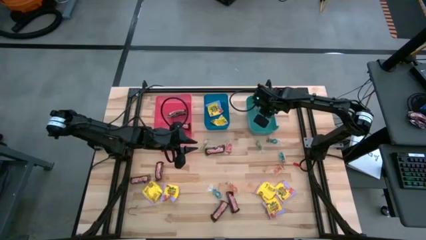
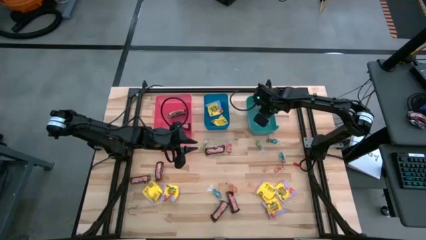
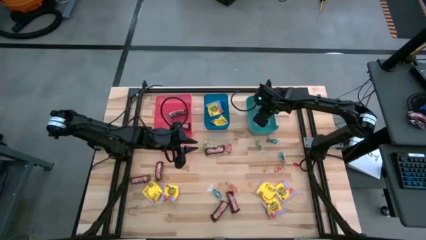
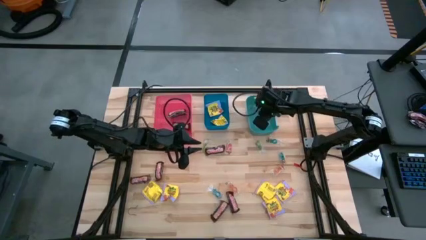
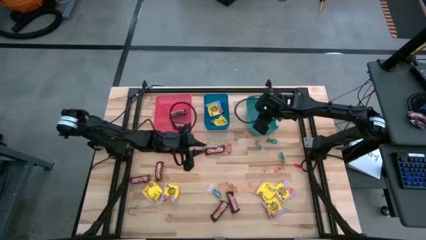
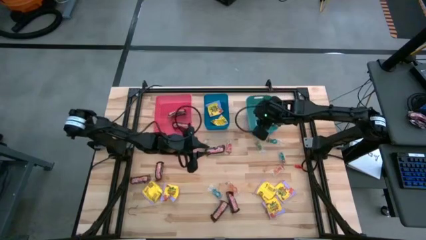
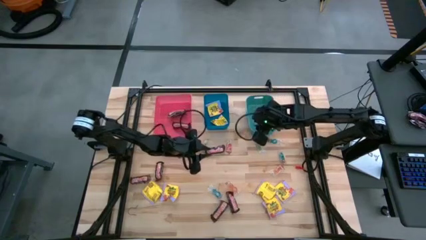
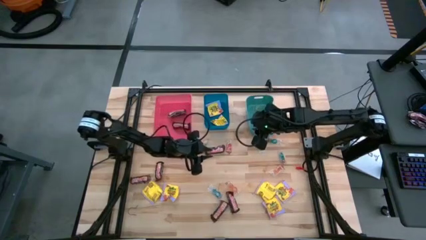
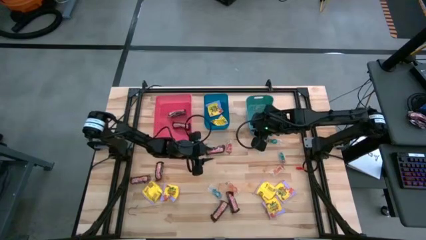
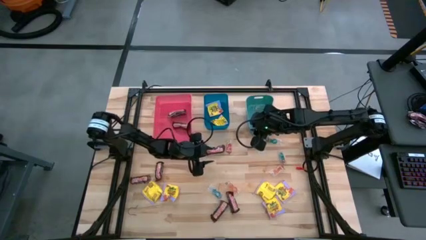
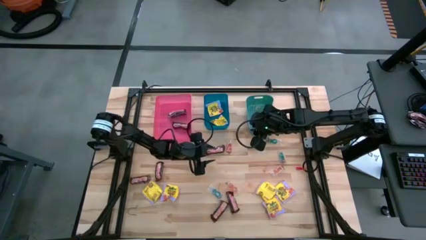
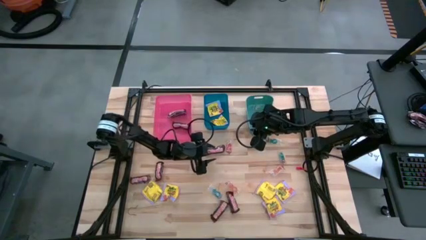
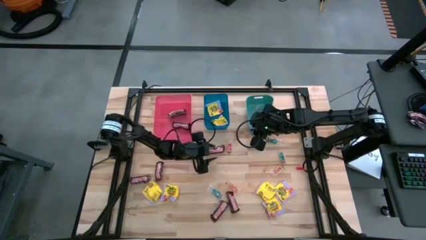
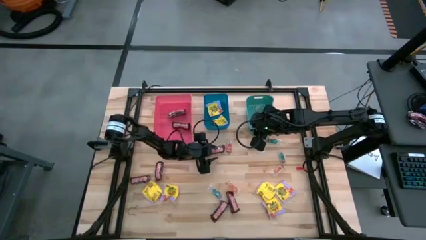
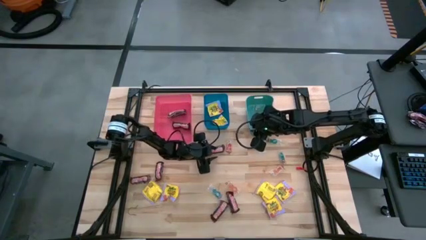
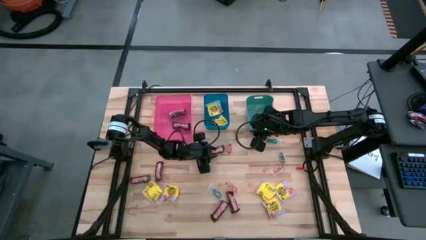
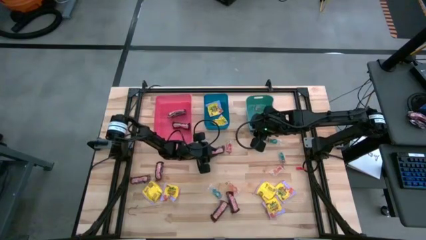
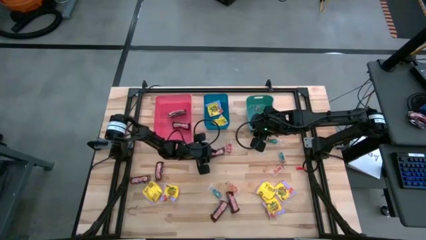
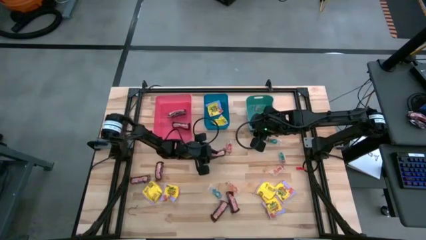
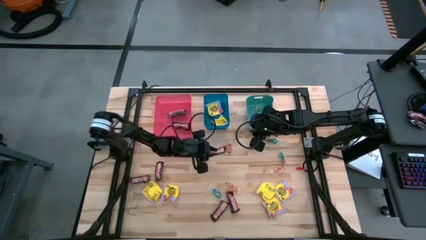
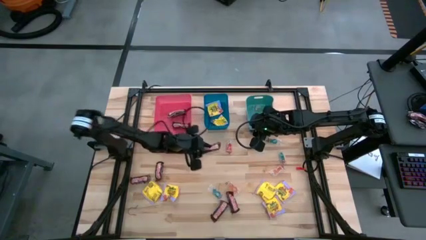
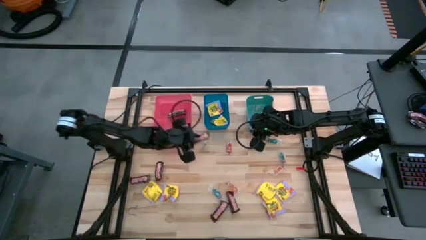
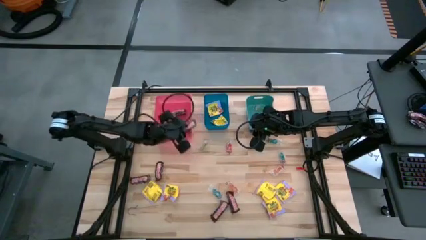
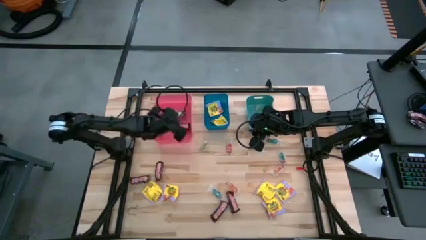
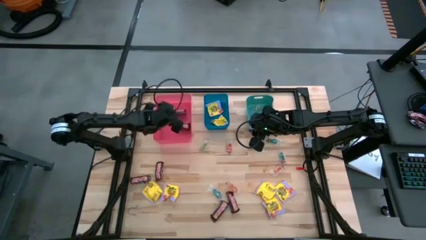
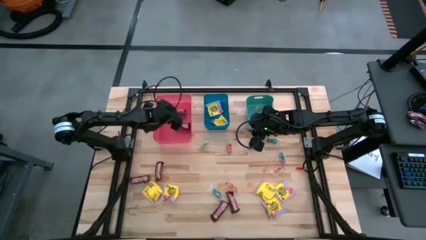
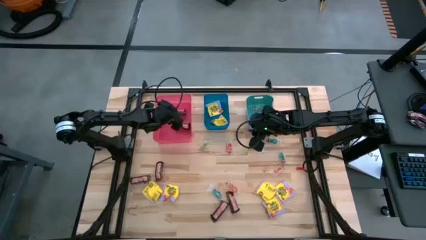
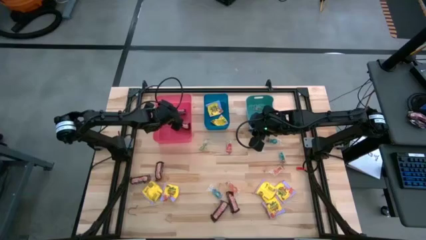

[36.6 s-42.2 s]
Task: Sort candy
Put the chocolate bar into the red bin

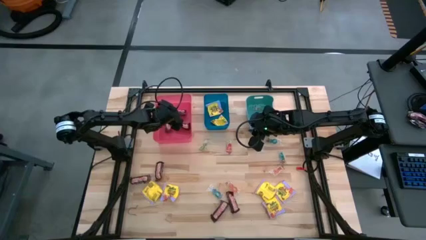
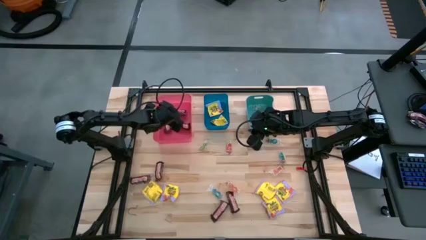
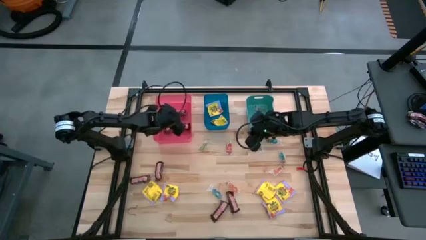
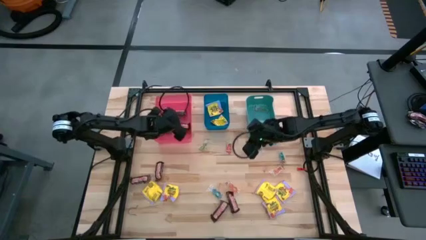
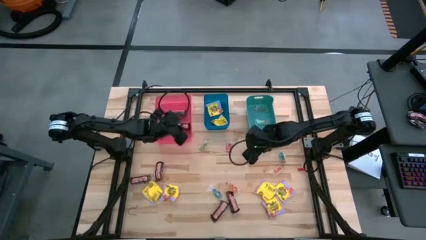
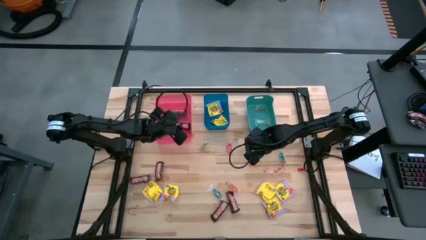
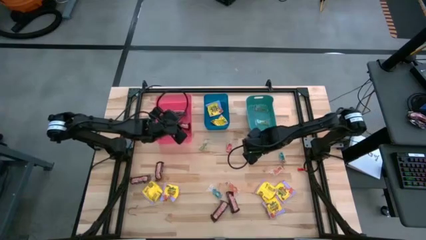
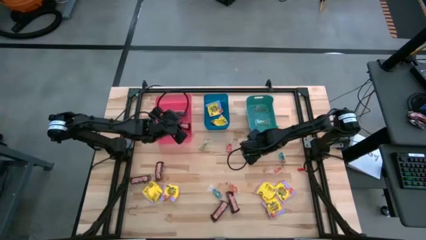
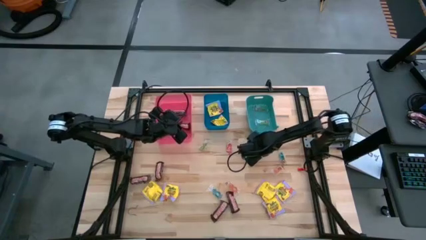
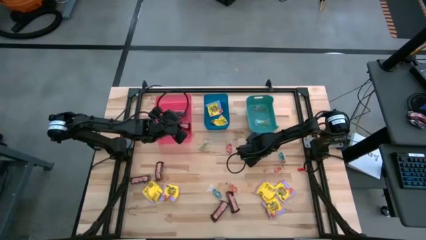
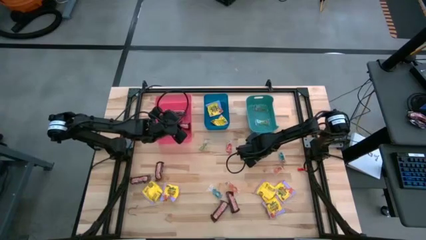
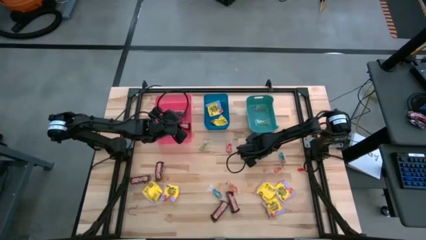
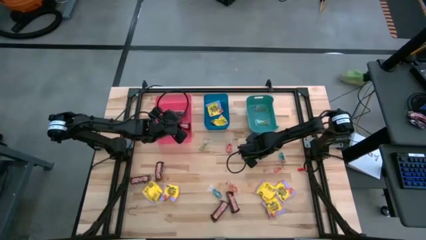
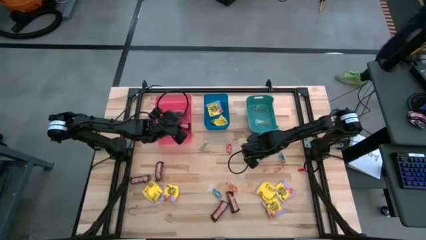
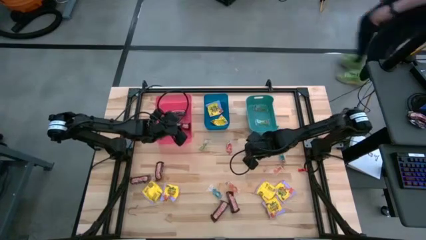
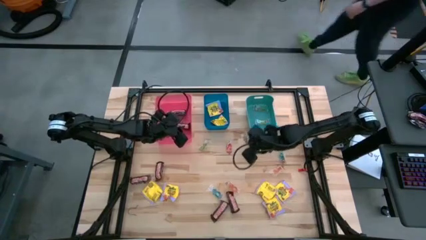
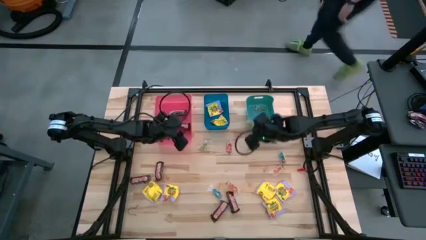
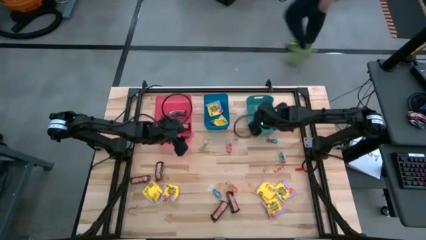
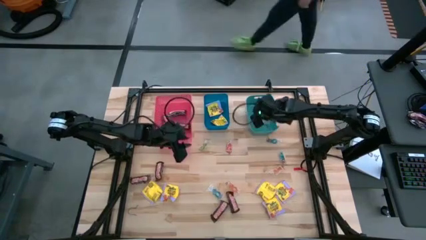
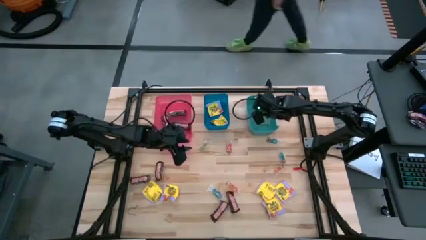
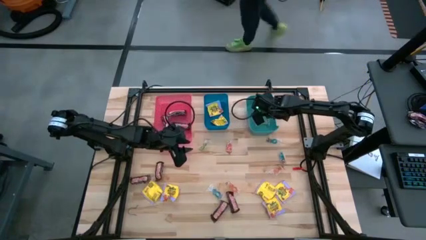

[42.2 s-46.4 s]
Put the green gummy into the green bin

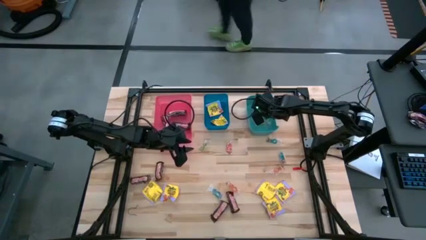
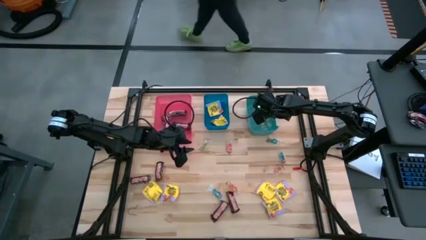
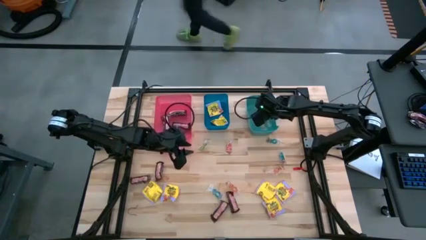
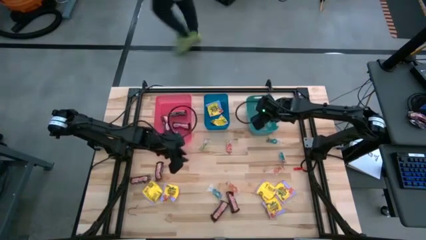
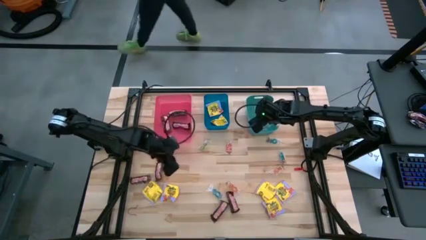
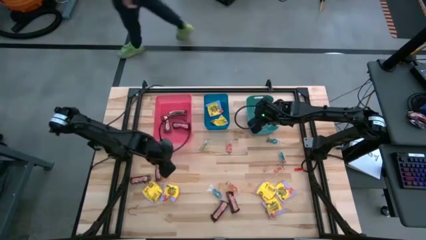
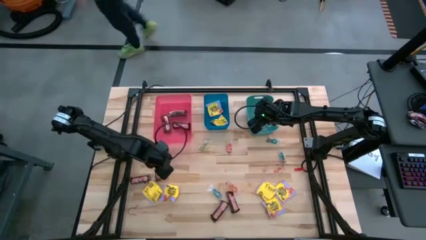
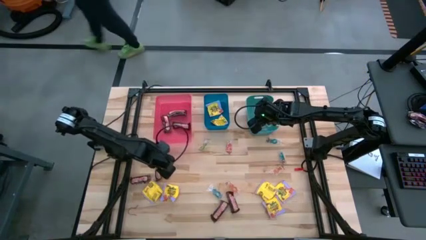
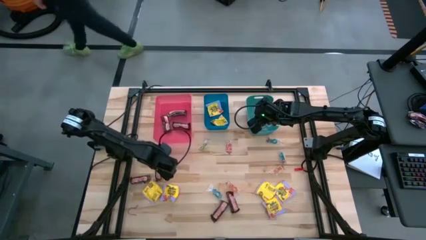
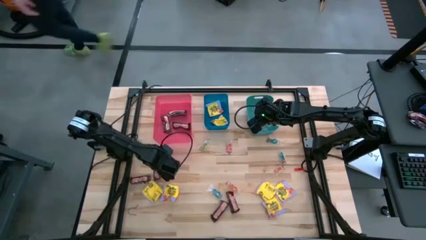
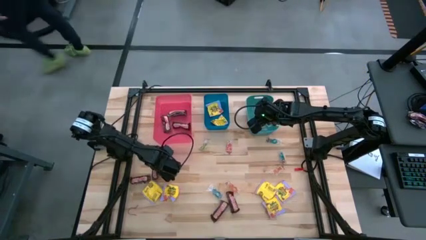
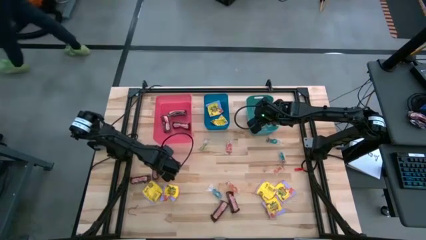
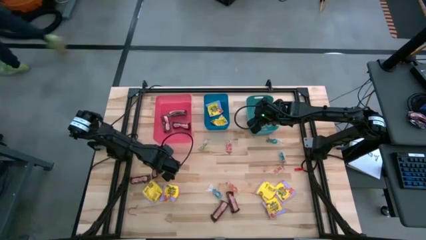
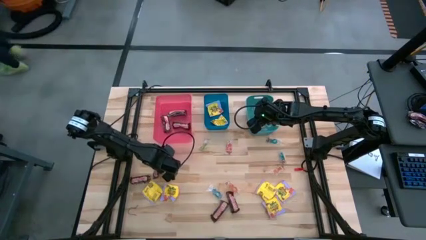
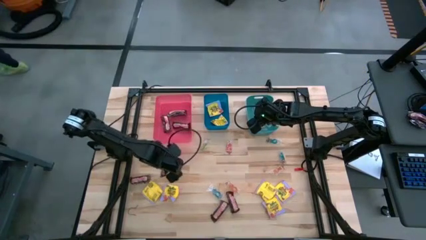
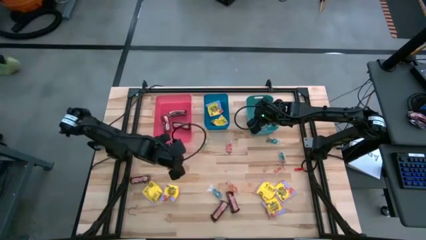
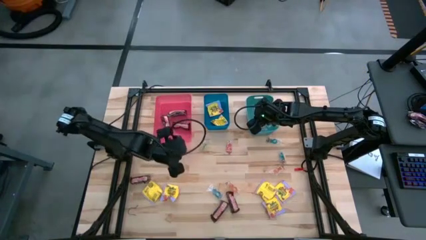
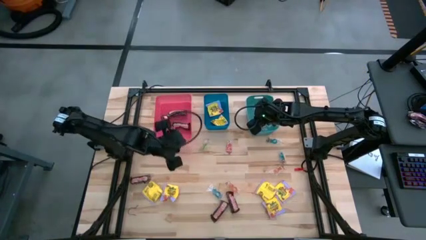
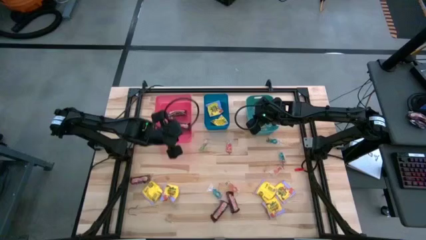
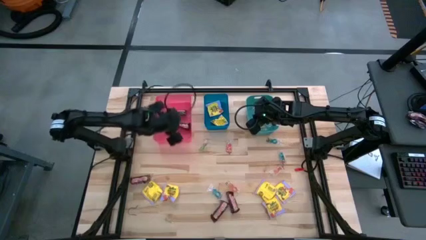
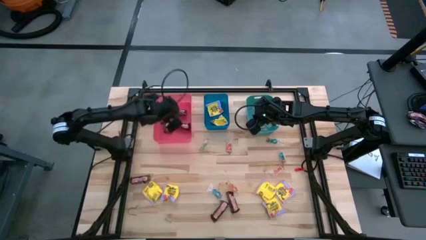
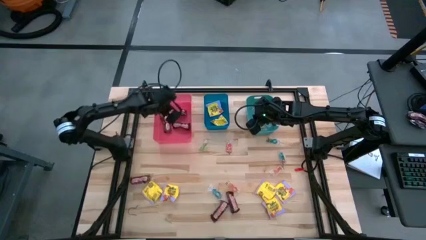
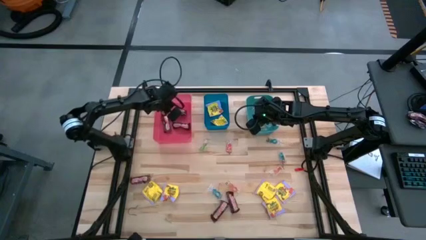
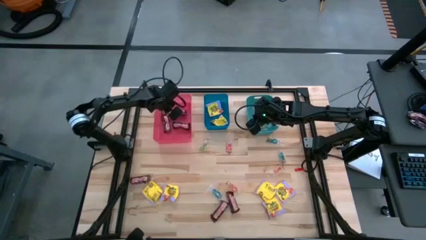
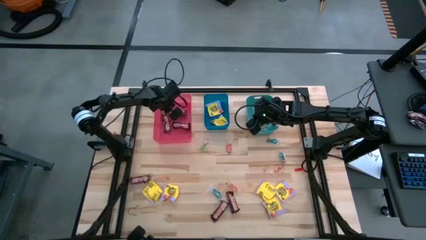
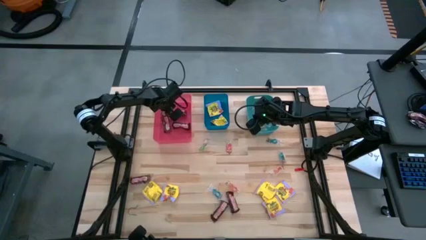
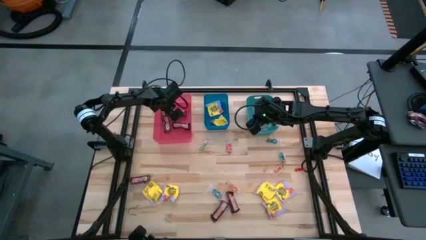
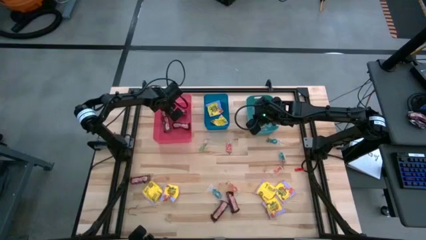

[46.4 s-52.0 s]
Put the chocolate bar into the red bin

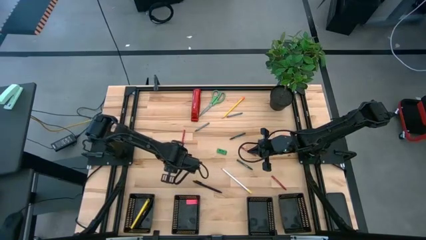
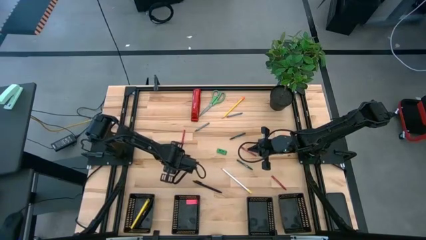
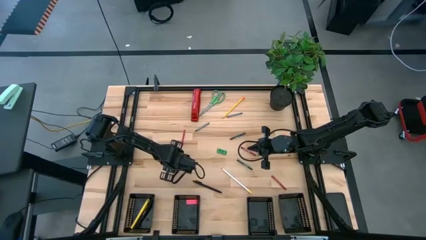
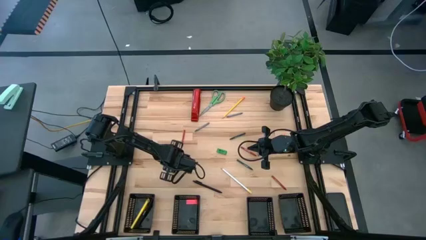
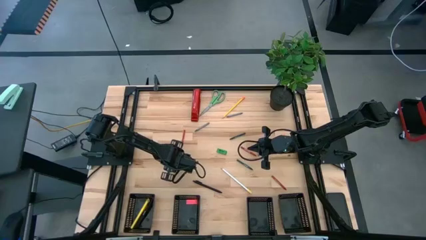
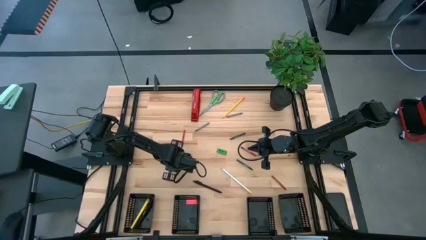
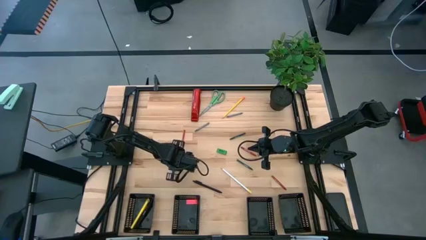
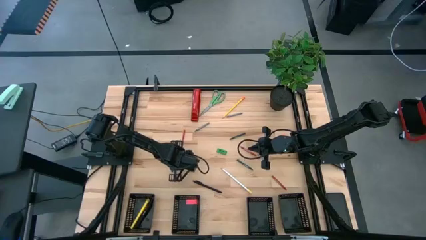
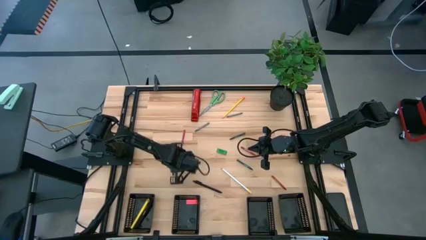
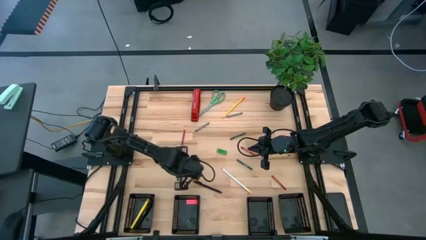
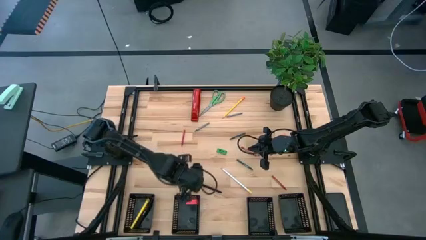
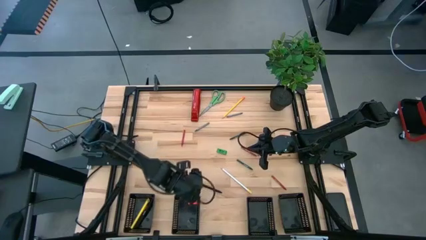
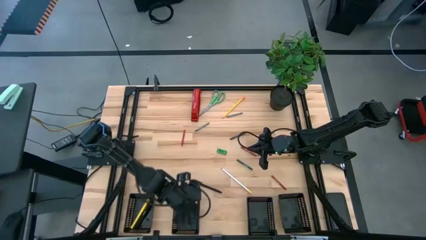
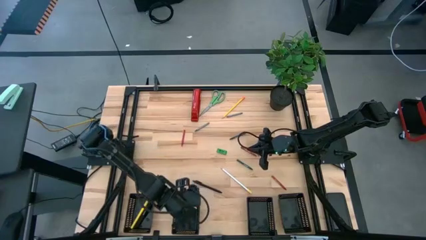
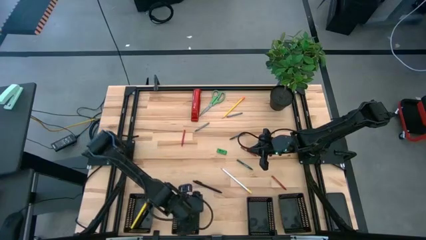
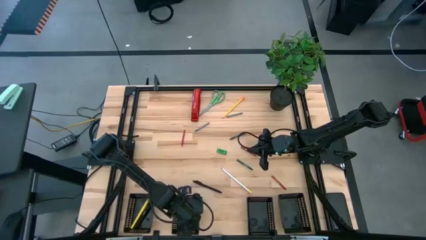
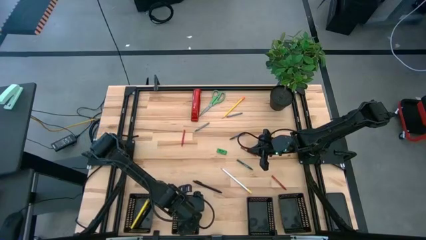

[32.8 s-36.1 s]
Task: Sort crayons/erasers/pens/pencils in bins
Put the yellow eraser into the middle left black bin
